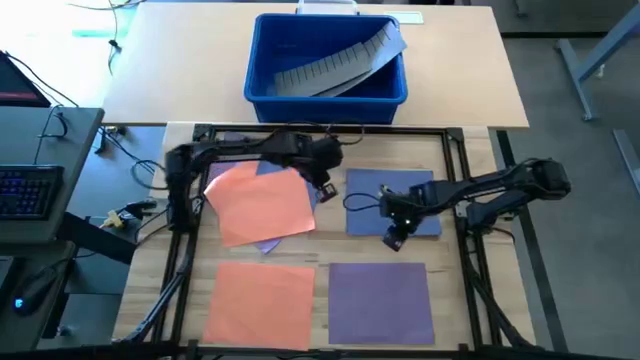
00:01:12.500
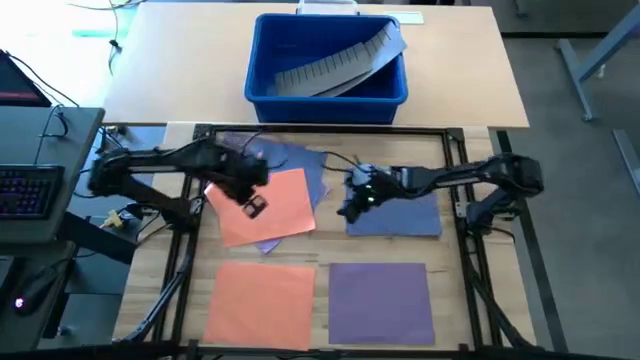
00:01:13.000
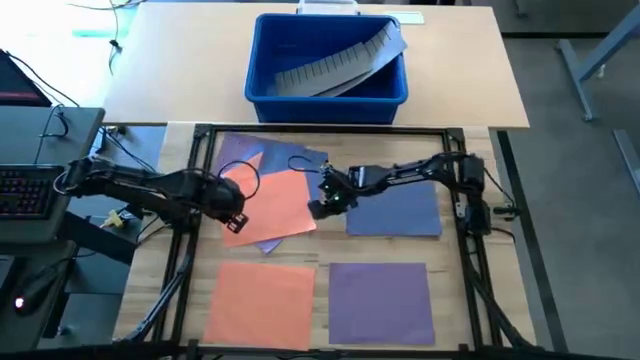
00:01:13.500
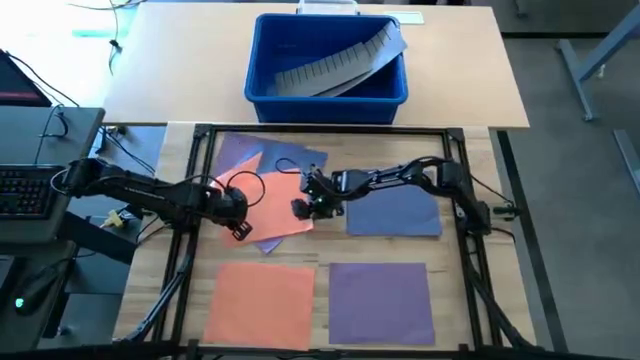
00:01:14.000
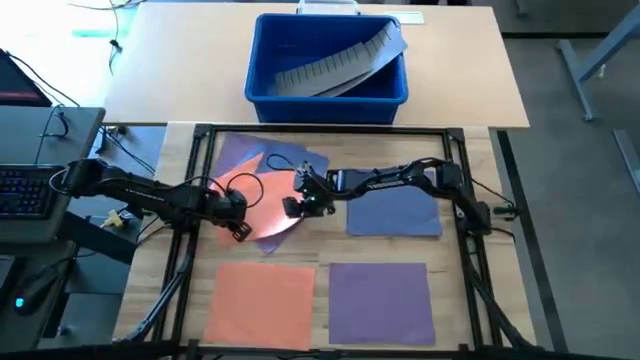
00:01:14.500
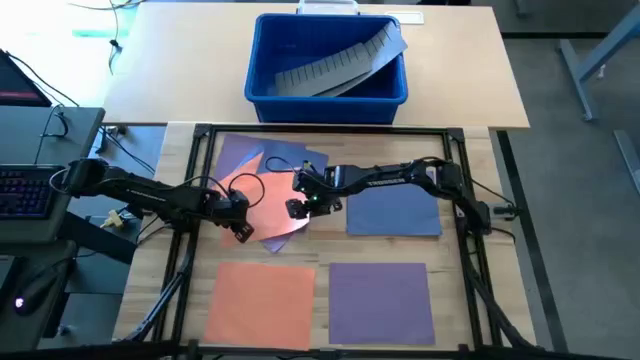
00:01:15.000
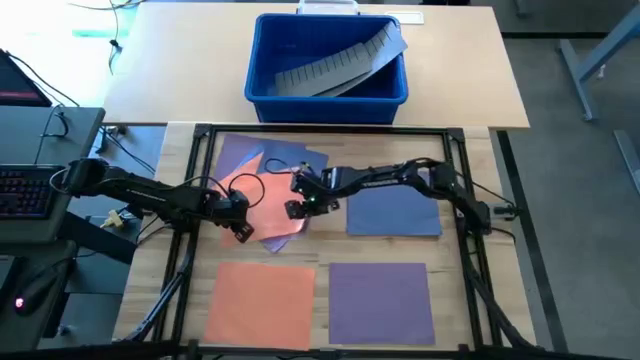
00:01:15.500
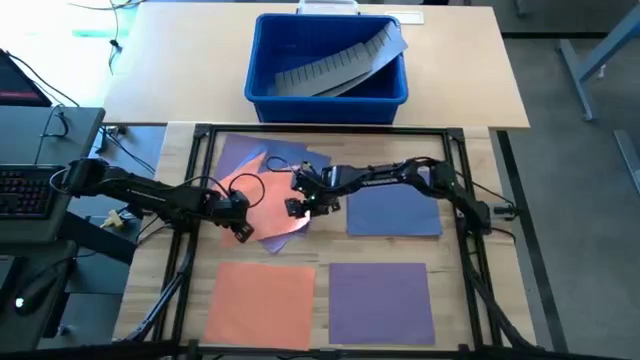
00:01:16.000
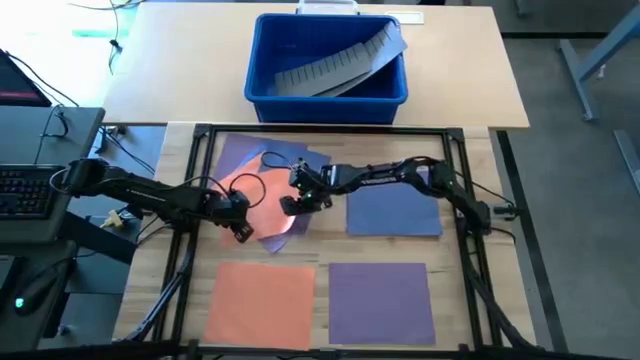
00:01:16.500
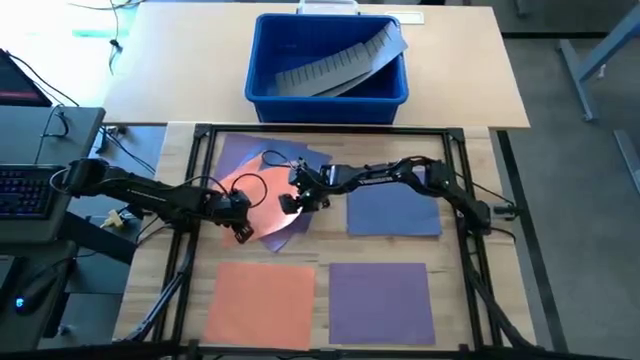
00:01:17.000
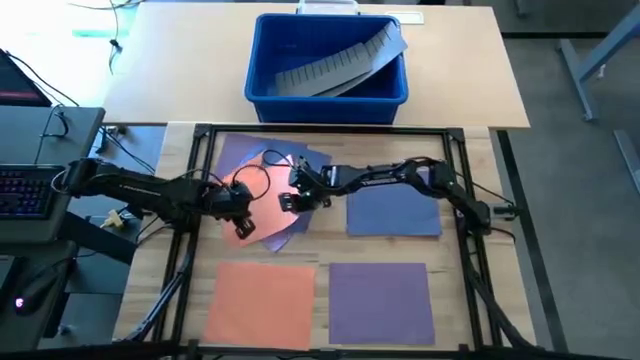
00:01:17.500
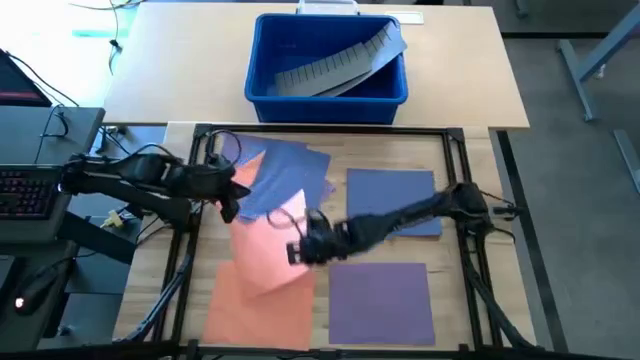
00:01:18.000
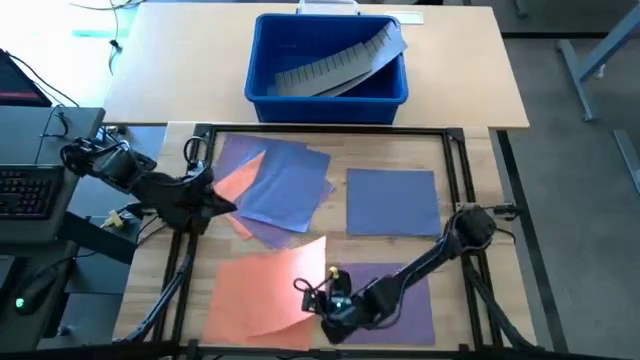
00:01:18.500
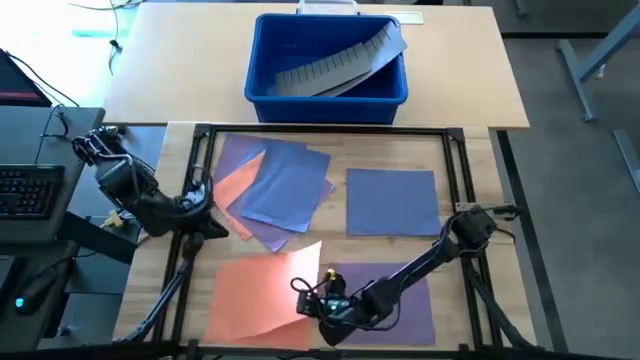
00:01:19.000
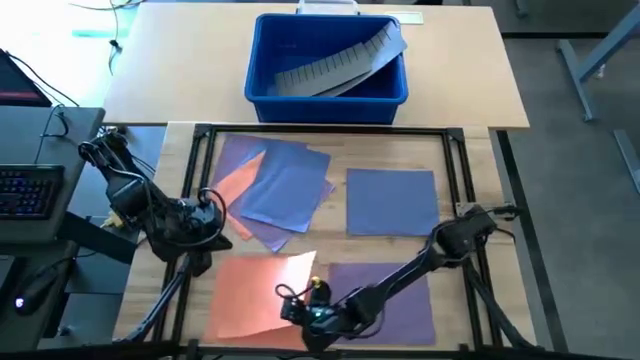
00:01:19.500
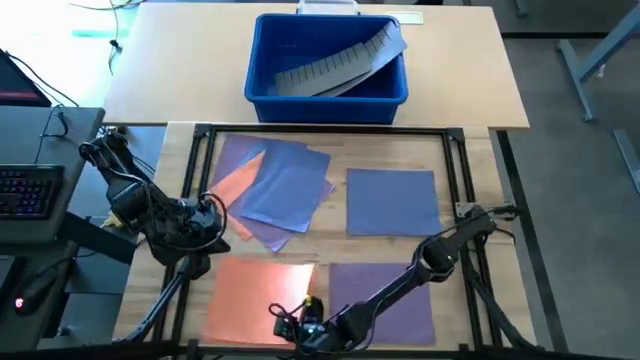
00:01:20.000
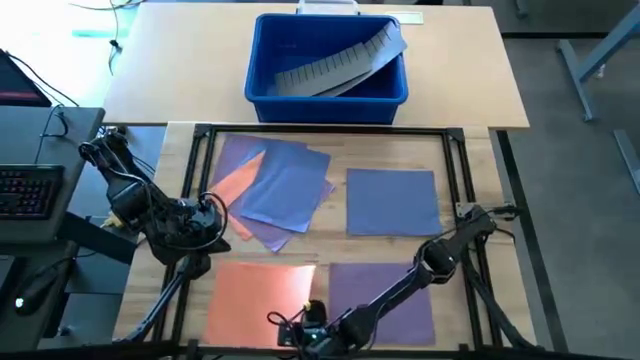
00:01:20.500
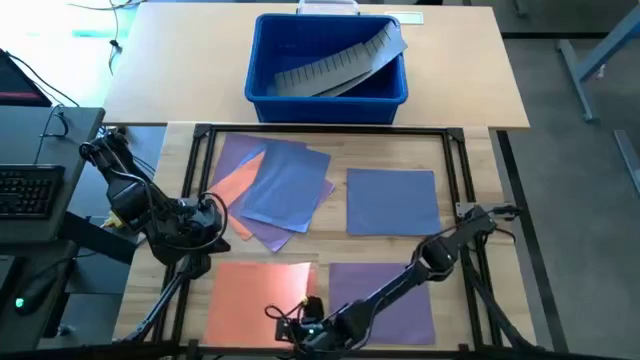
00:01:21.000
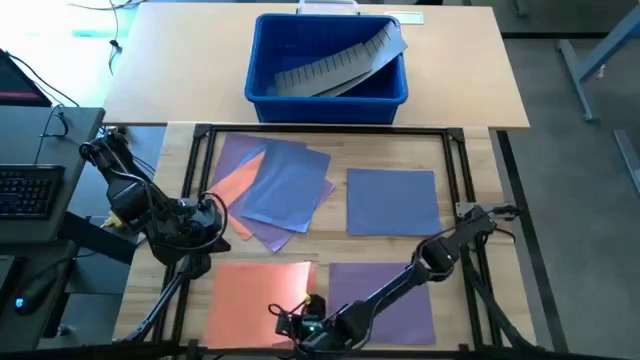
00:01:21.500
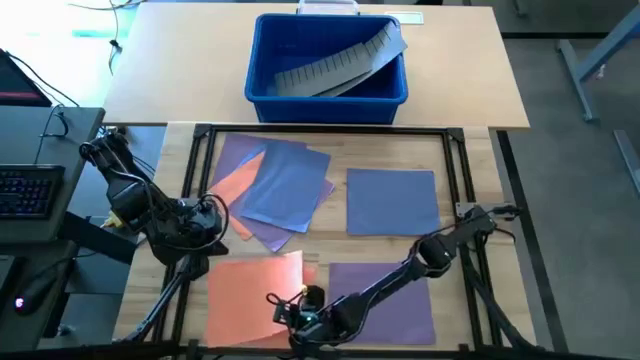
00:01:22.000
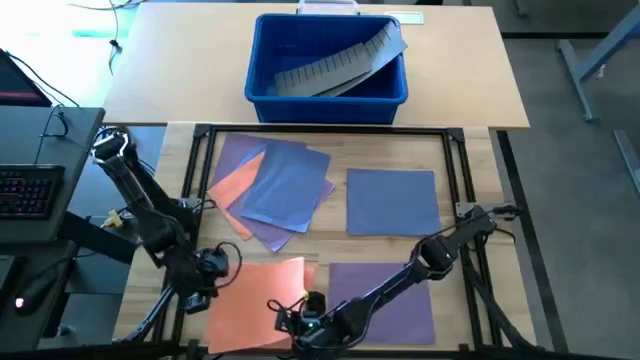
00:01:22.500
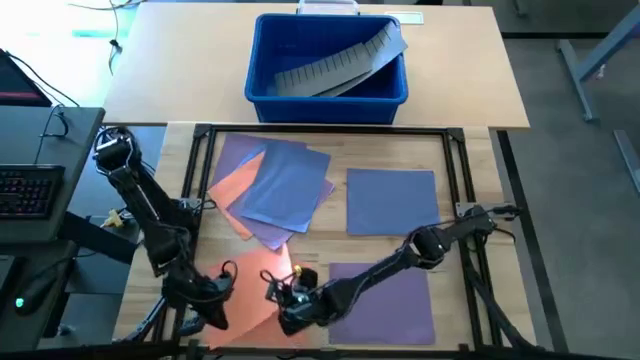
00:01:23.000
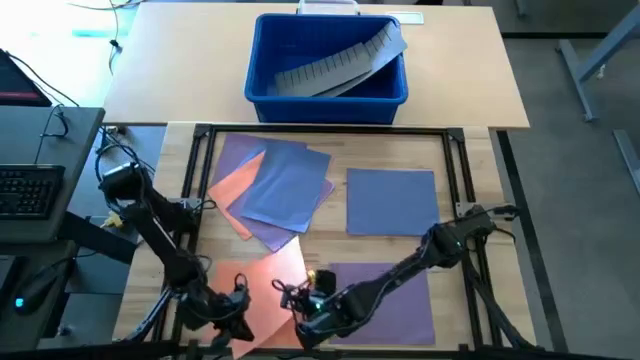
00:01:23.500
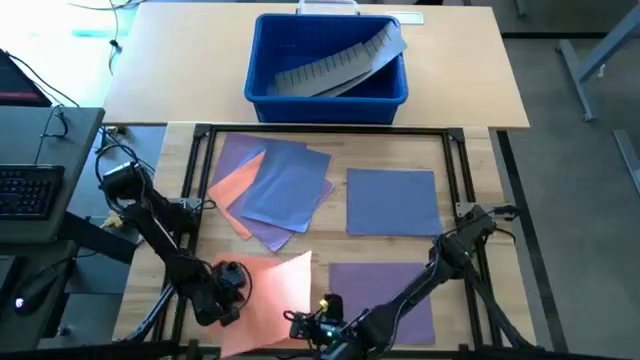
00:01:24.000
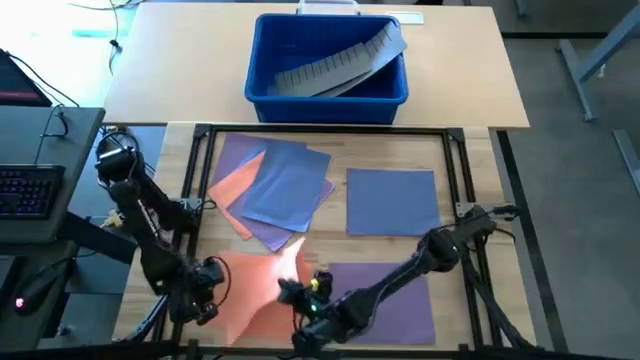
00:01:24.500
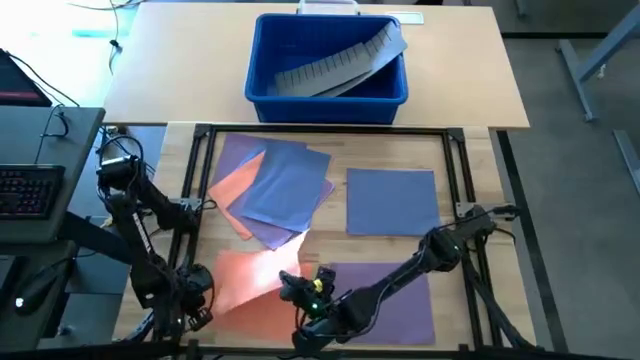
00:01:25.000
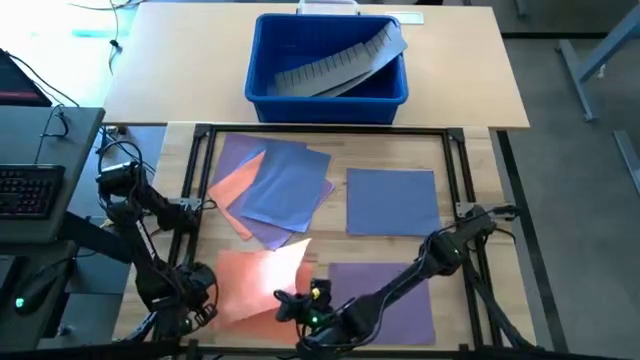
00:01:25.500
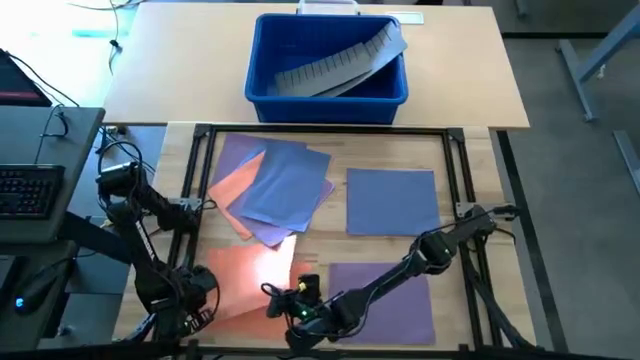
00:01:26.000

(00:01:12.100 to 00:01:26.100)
Task: Organize paper
Stack the orange paper on top of the orange paper

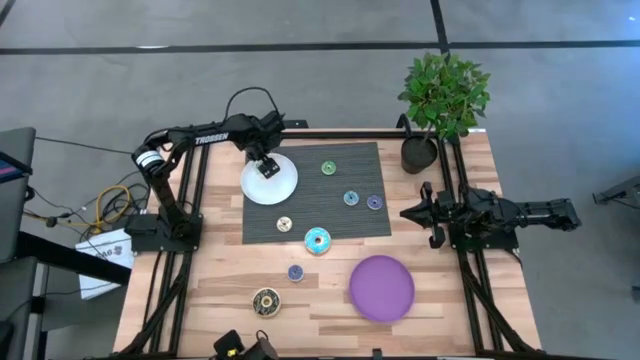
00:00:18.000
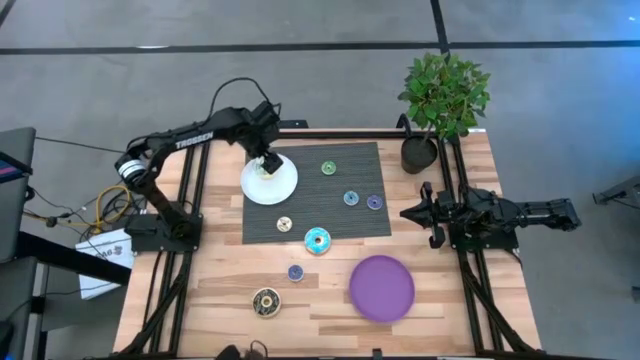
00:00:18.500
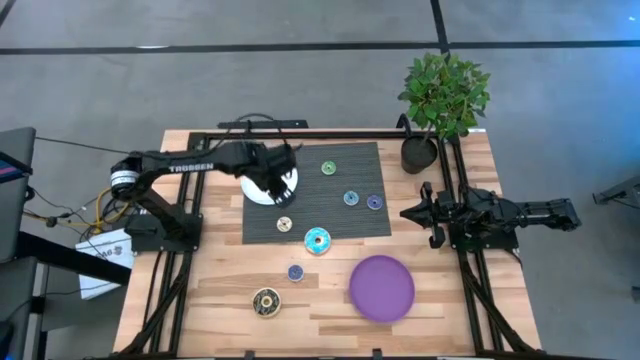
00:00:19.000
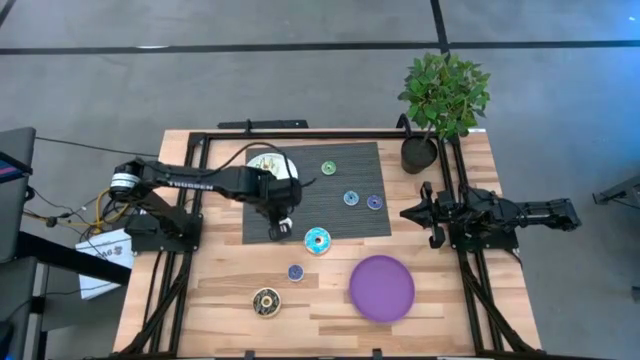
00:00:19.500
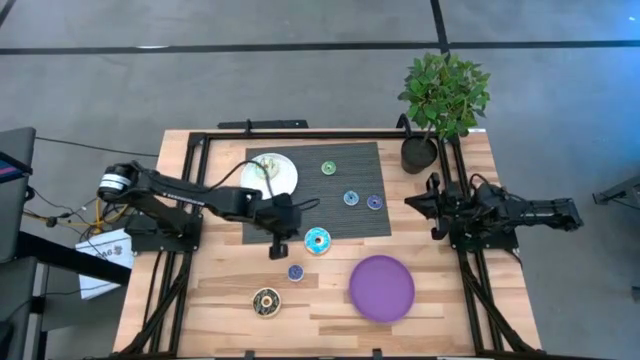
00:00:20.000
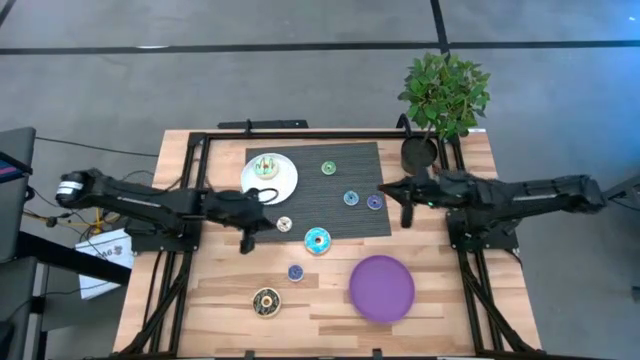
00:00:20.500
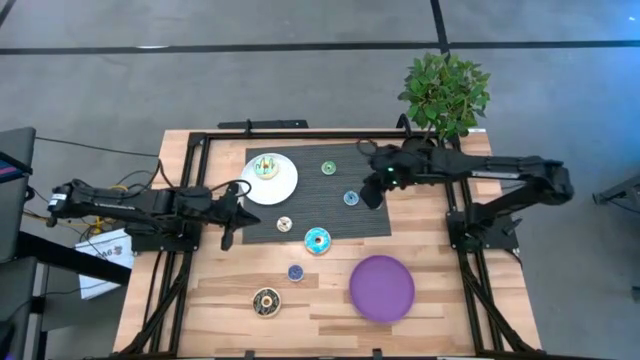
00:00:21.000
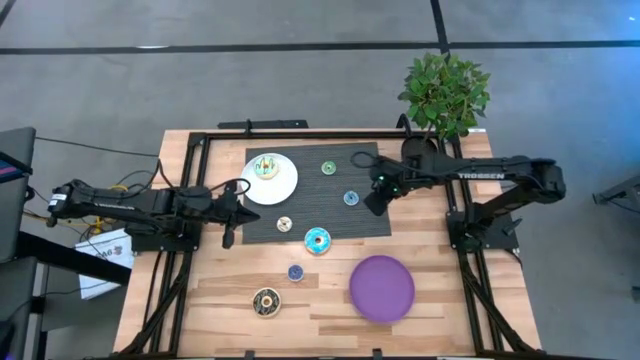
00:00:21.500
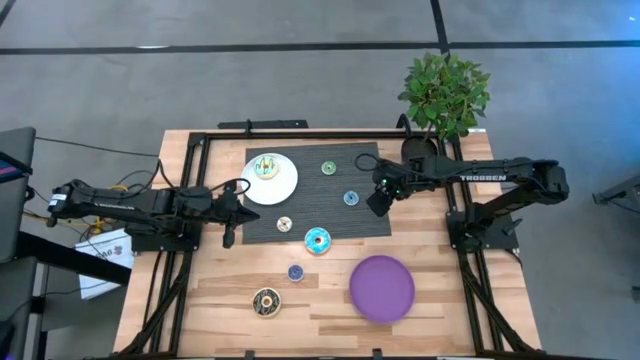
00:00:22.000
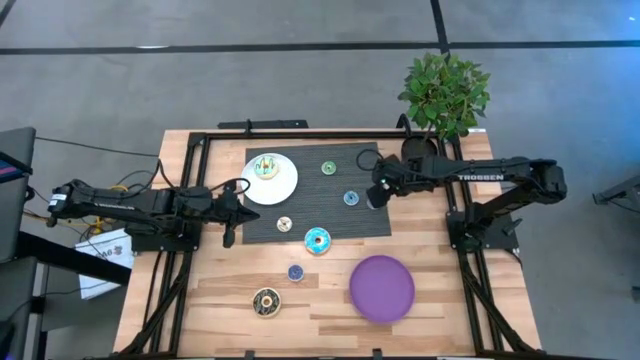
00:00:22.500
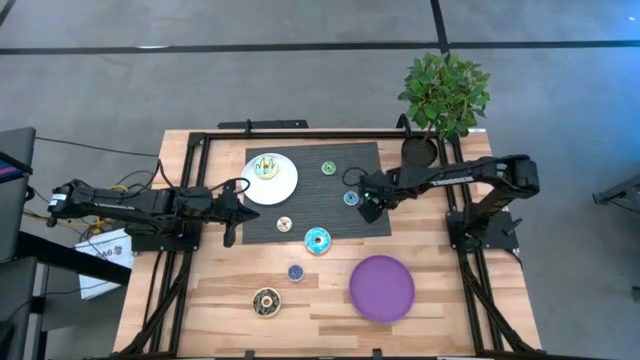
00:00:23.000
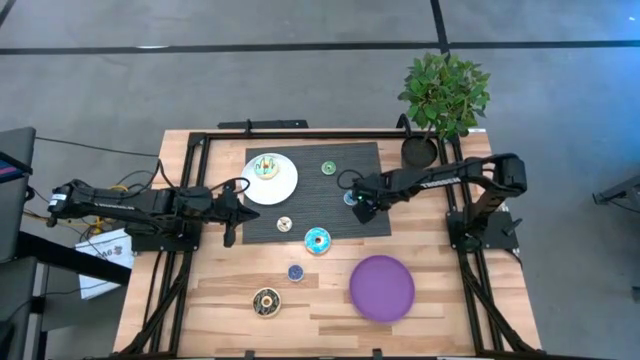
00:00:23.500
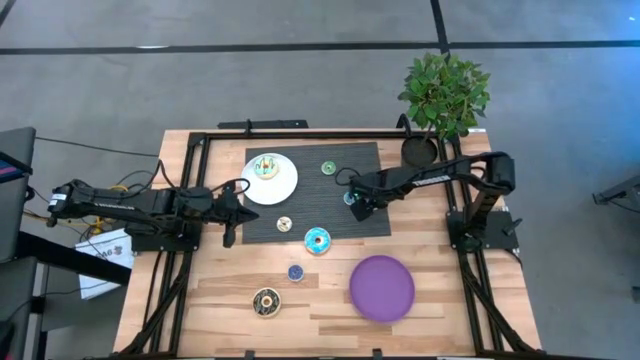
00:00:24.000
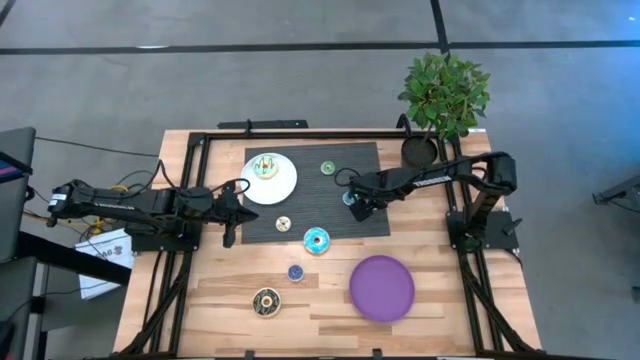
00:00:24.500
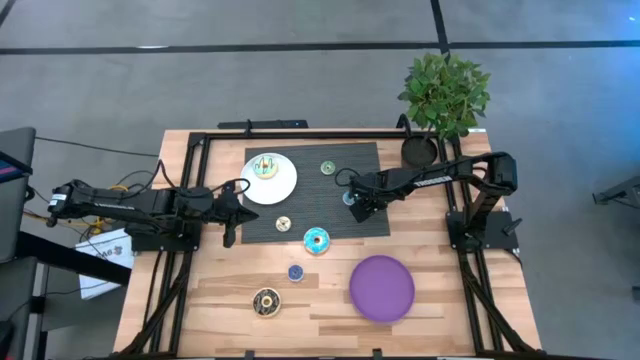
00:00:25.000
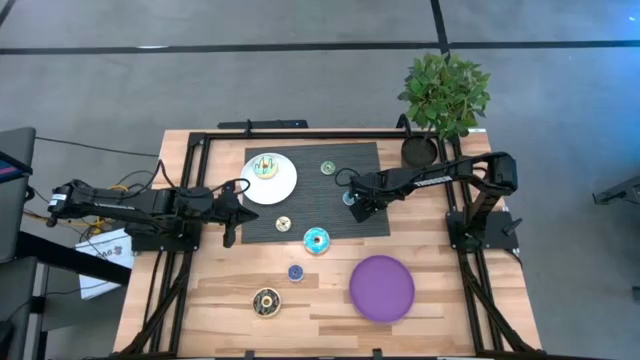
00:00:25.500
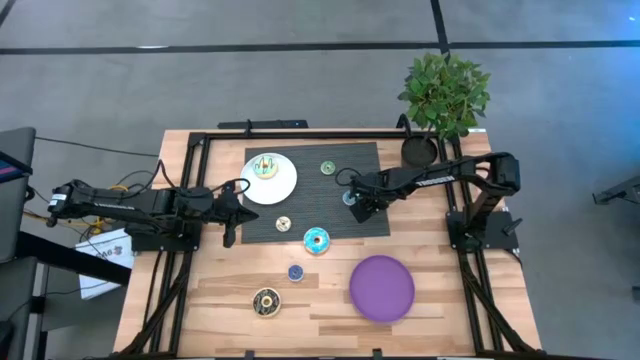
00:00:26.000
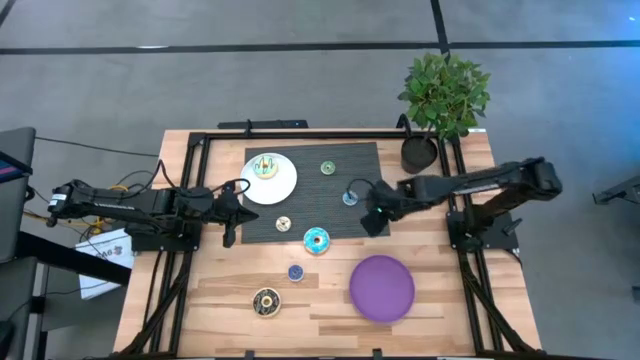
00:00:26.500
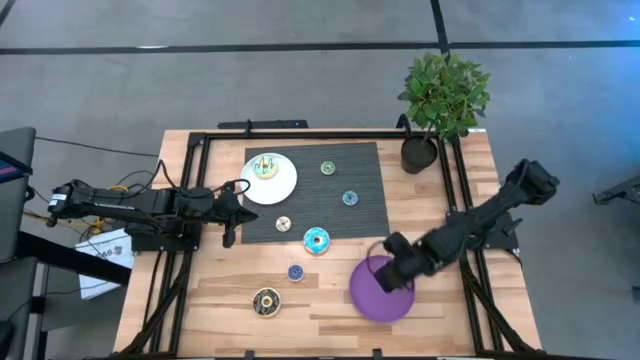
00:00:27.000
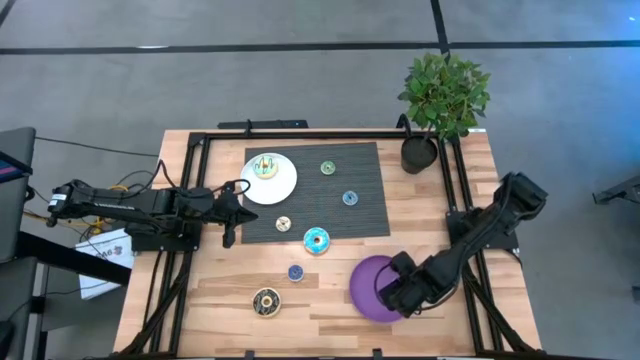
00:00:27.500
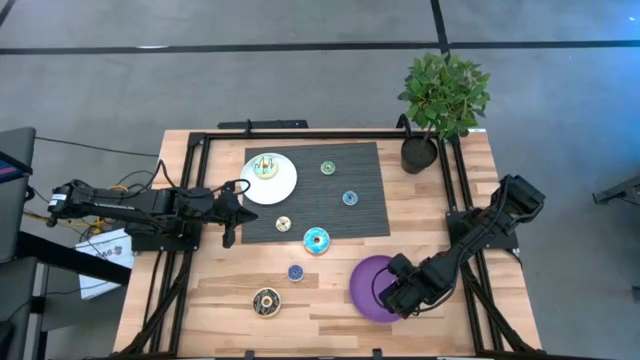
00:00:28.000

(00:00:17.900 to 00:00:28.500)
Task: Pick & Place donuts
Put the top small blue donut on the purple plate
